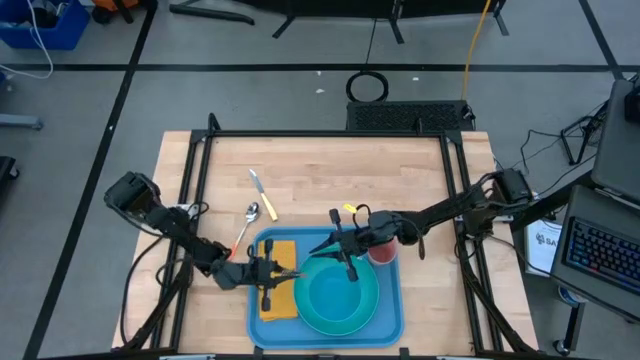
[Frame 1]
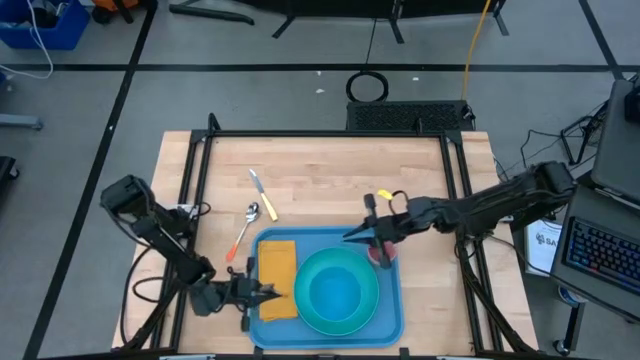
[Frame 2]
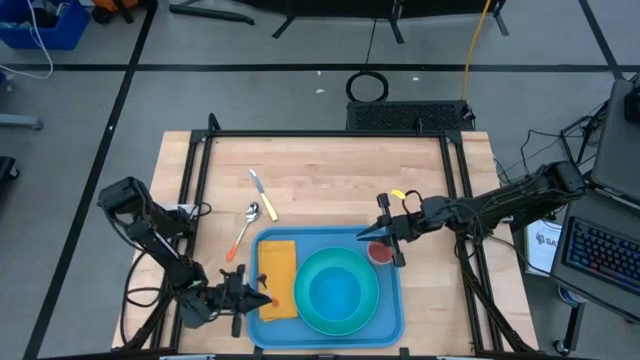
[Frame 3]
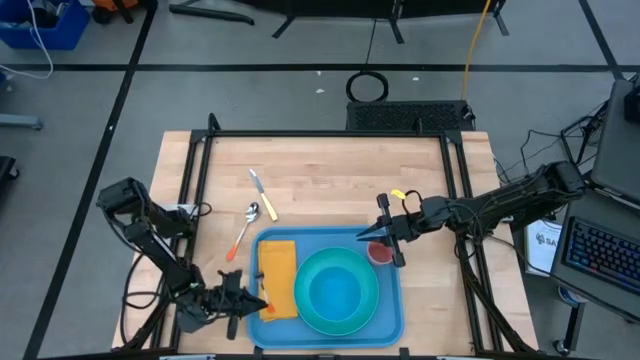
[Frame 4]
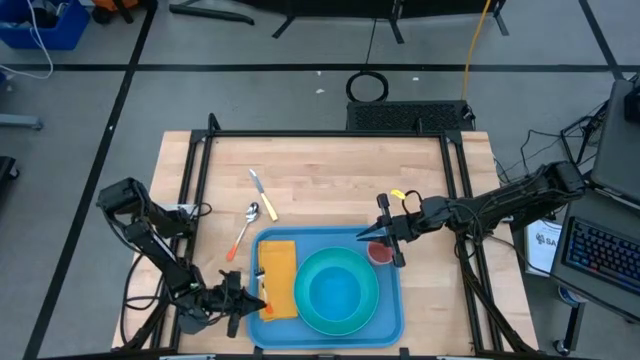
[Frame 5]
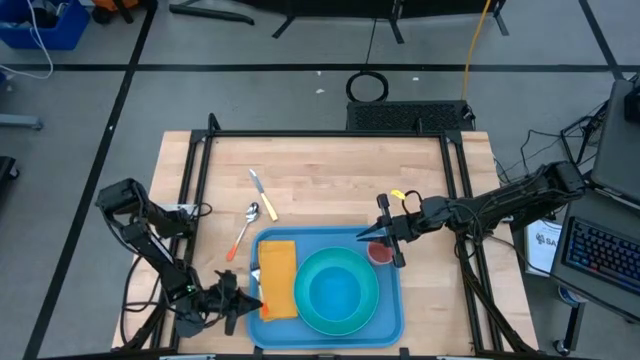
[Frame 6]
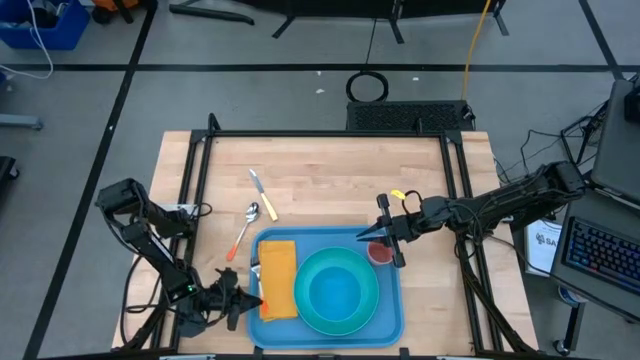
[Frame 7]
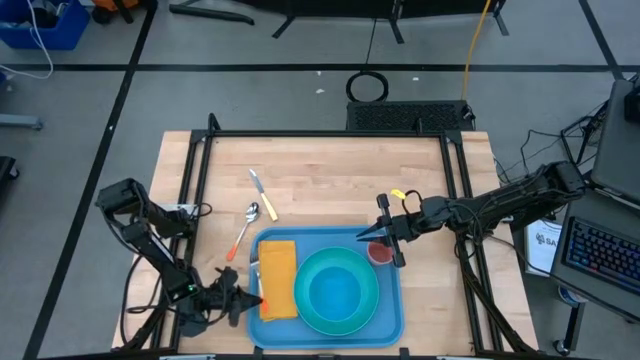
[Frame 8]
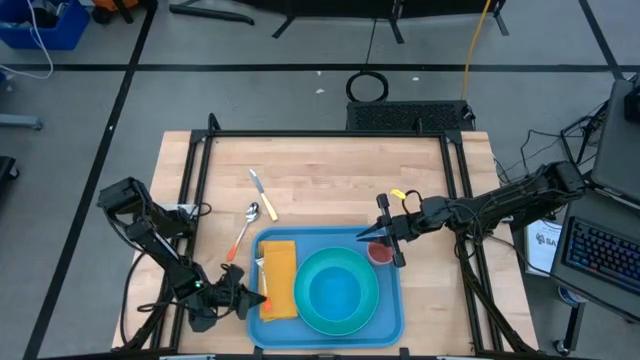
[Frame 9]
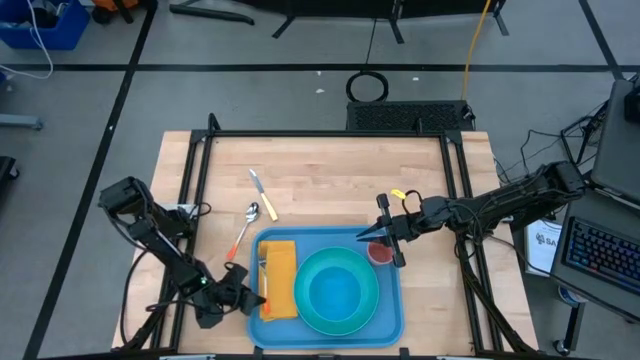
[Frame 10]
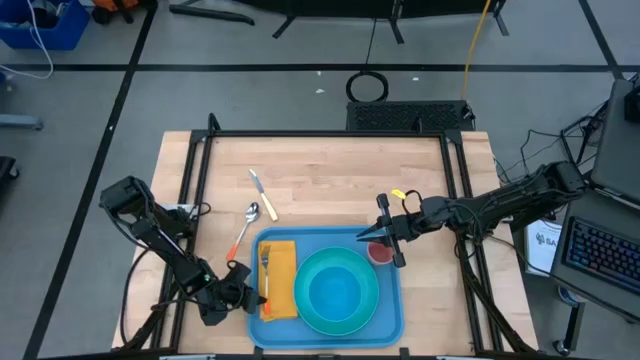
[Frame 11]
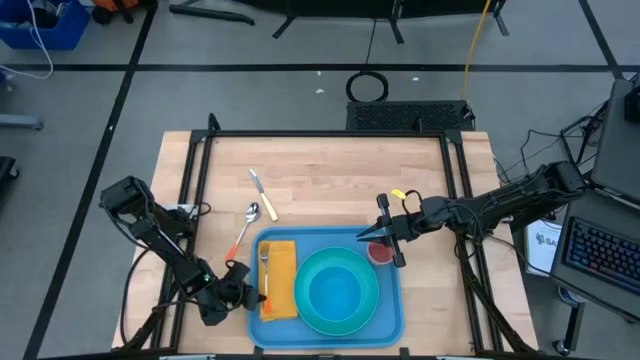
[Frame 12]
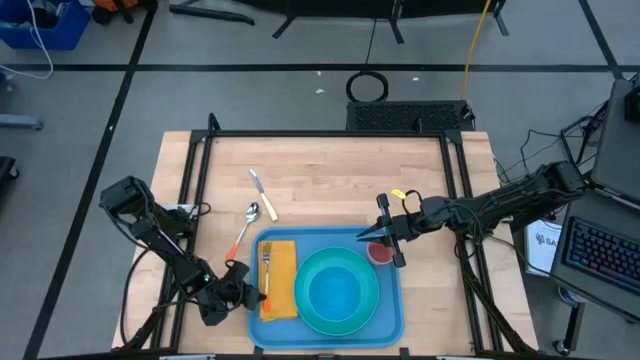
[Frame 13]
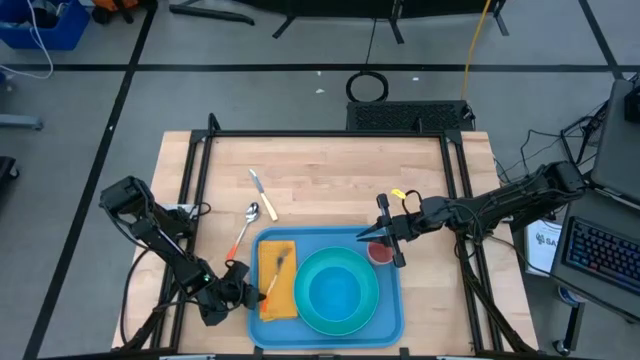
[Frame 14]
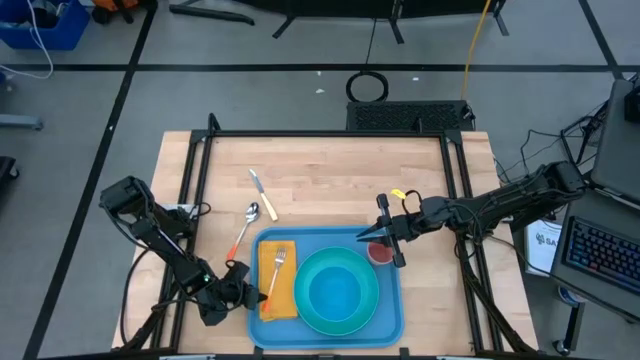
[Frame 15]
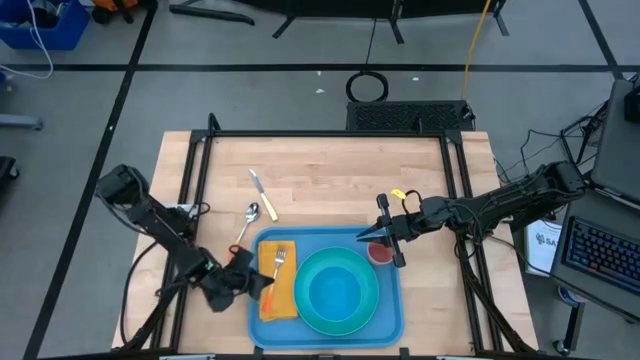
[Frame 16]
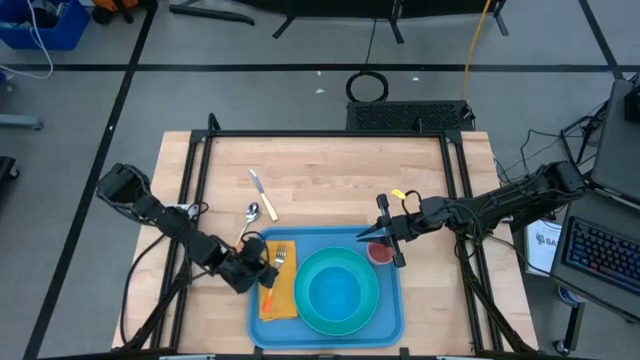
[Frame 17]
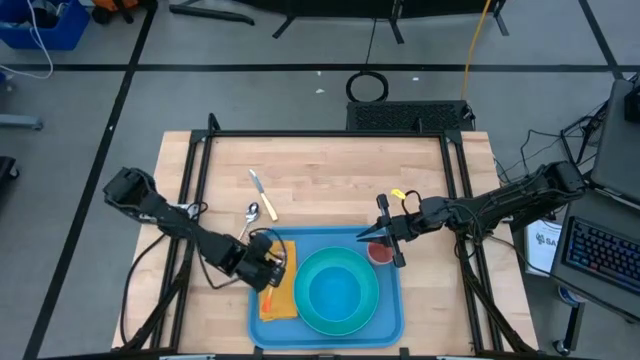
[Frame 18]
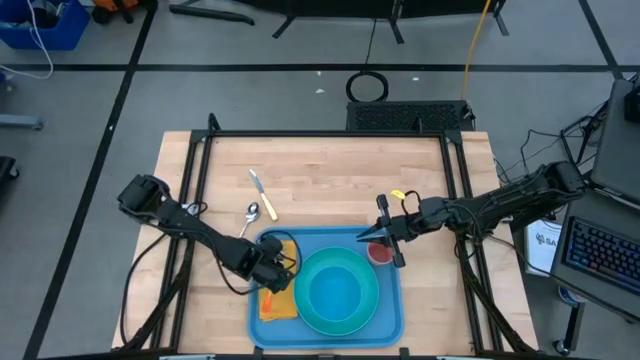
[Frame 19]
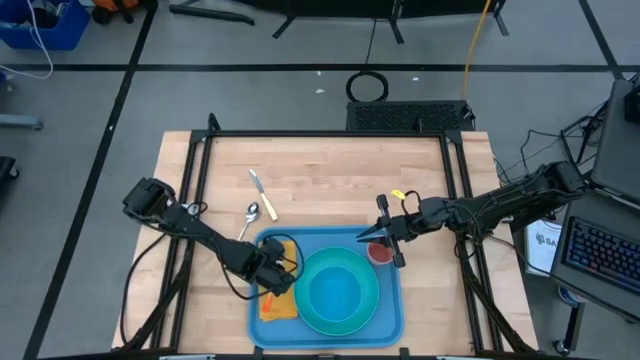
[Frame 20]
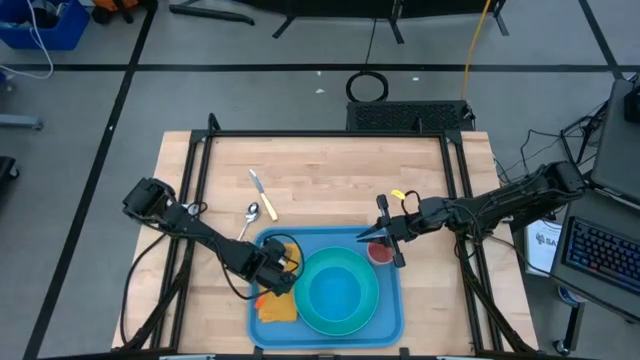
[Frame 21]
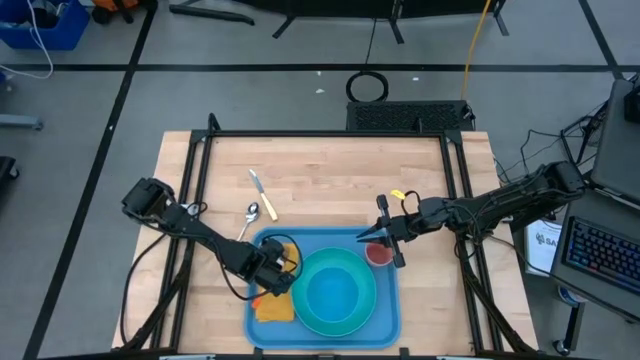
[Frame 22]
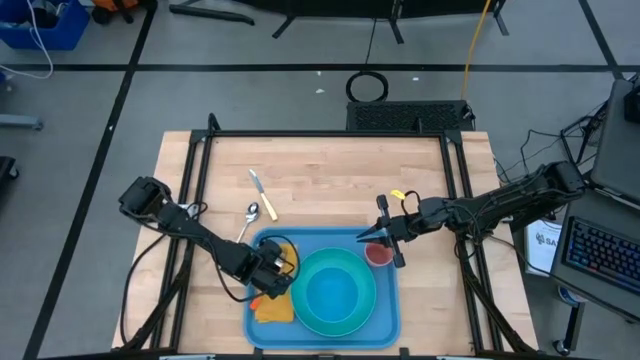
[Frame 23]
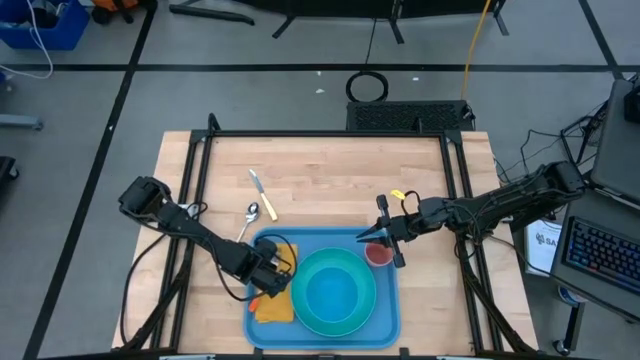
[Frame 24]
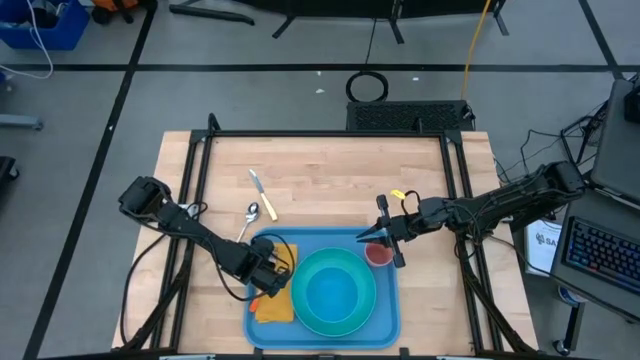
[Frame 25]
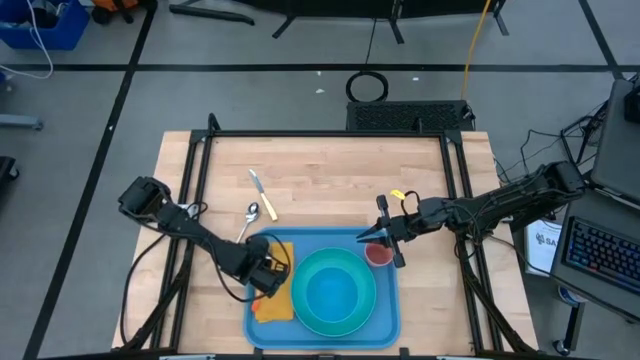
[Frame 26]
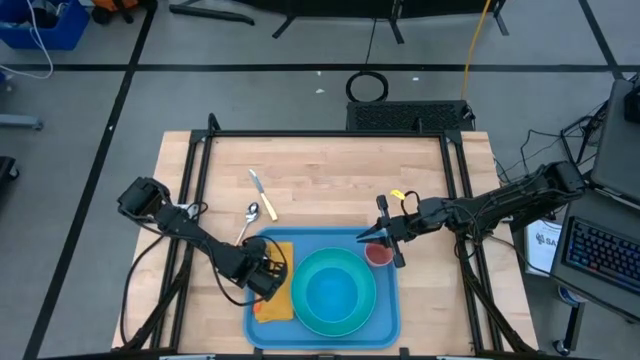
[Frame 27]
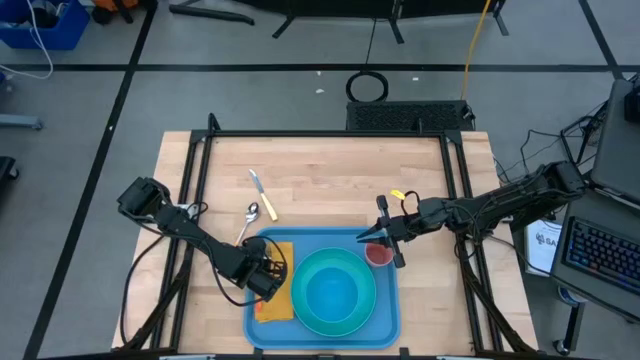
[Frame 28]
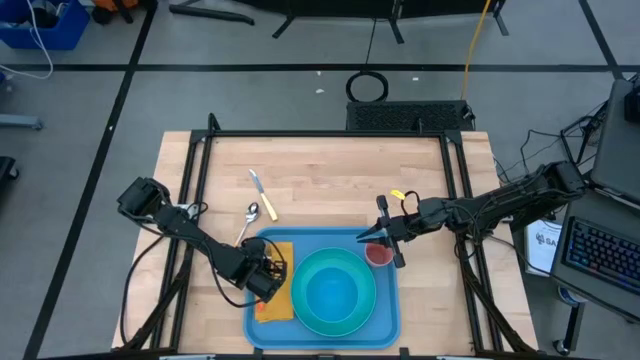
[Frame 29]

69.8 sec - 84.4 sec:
Task: Set up tray
Put the orange fork on the yellow napkin

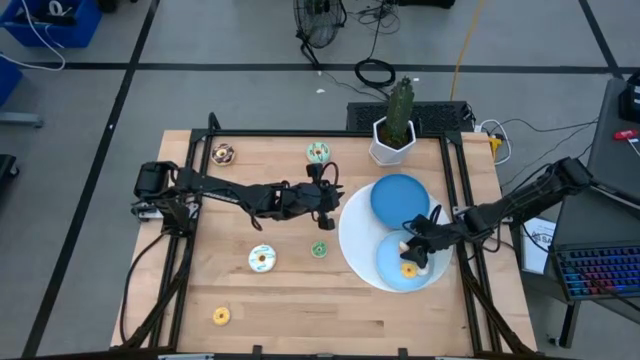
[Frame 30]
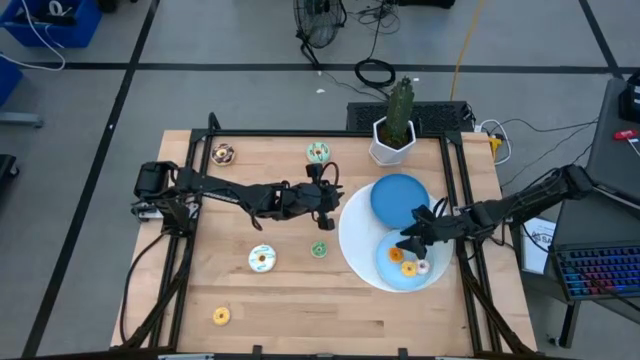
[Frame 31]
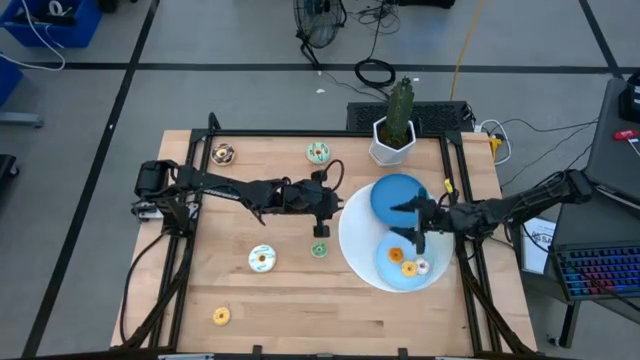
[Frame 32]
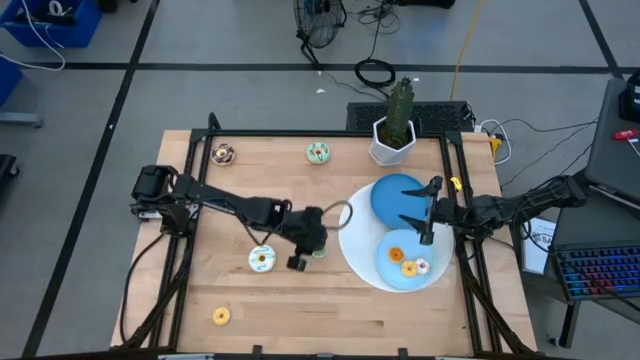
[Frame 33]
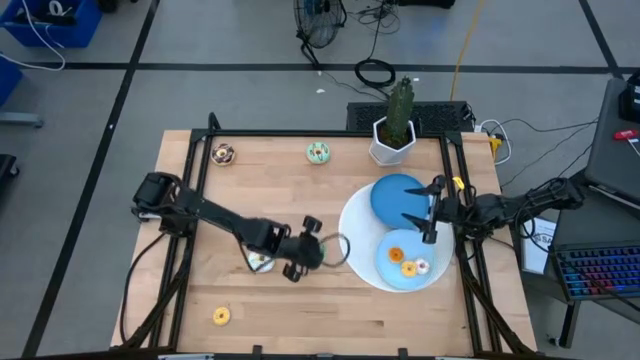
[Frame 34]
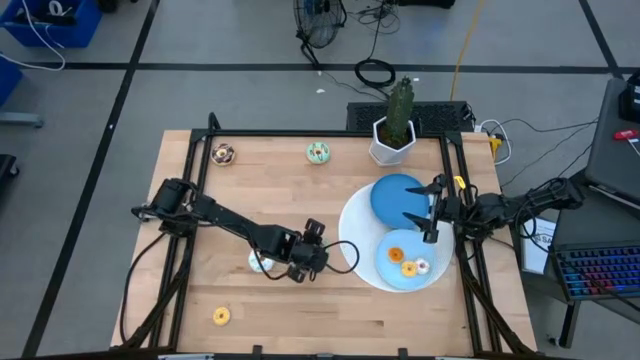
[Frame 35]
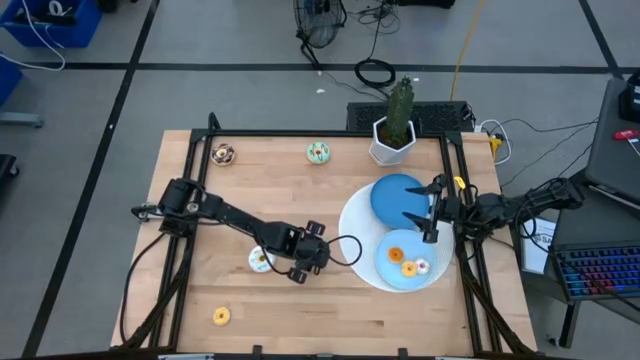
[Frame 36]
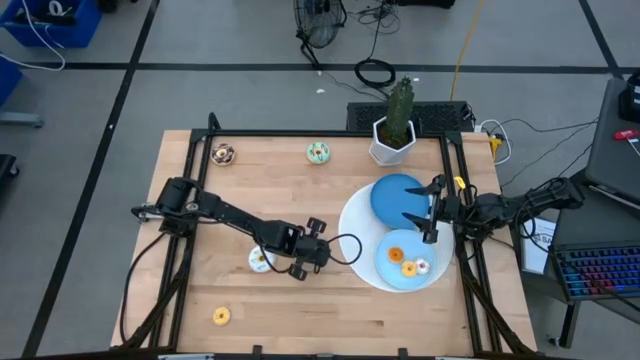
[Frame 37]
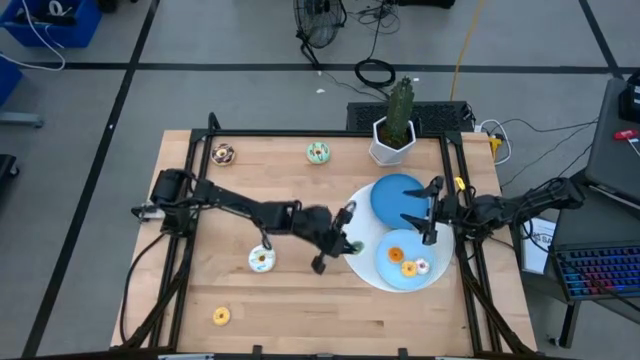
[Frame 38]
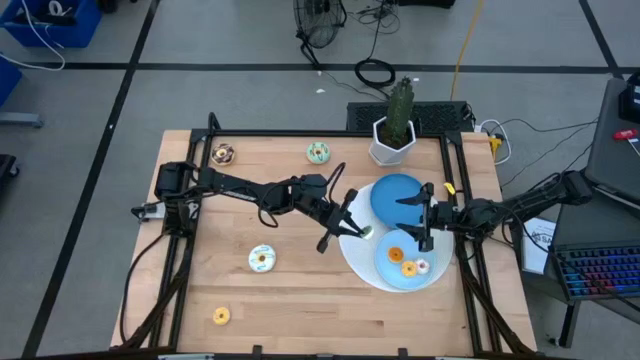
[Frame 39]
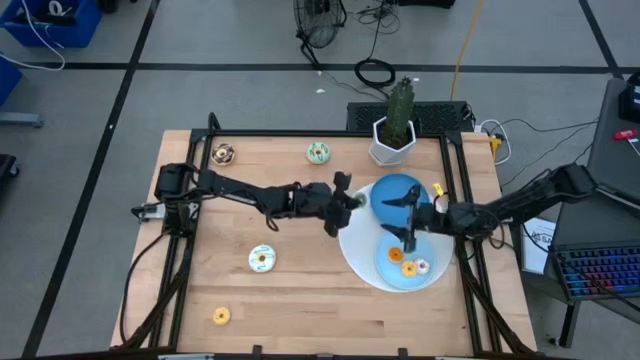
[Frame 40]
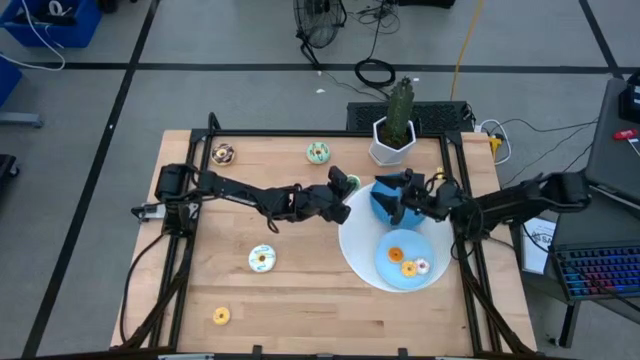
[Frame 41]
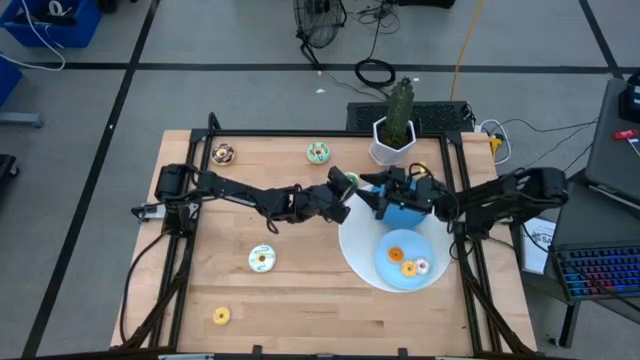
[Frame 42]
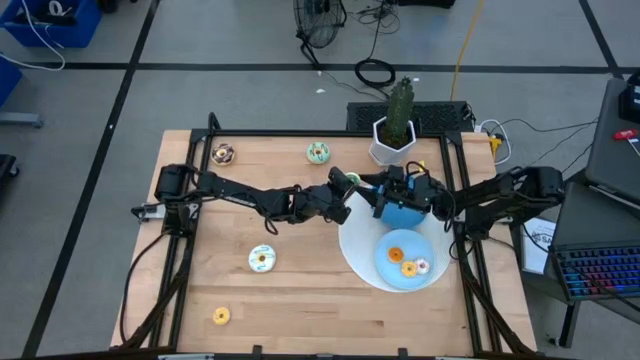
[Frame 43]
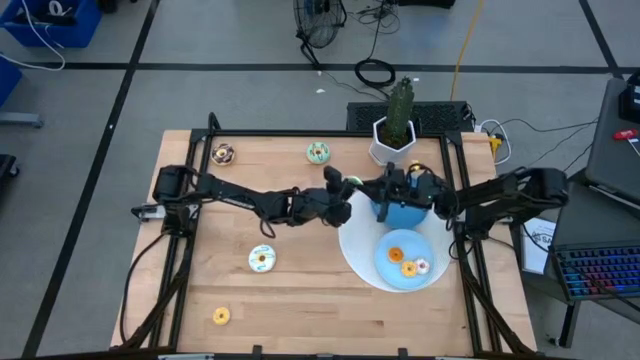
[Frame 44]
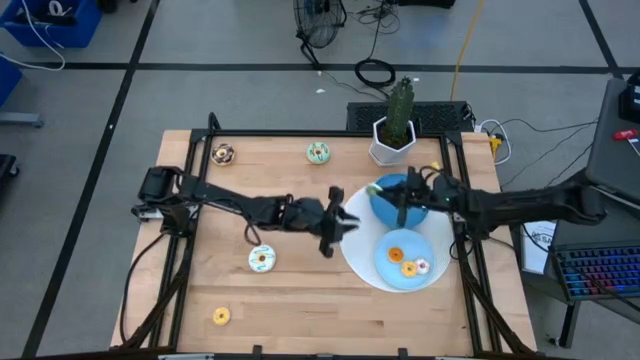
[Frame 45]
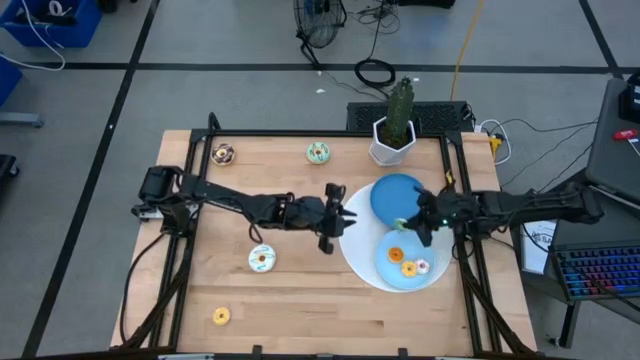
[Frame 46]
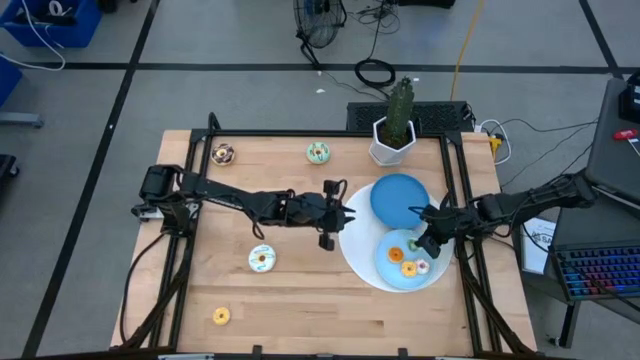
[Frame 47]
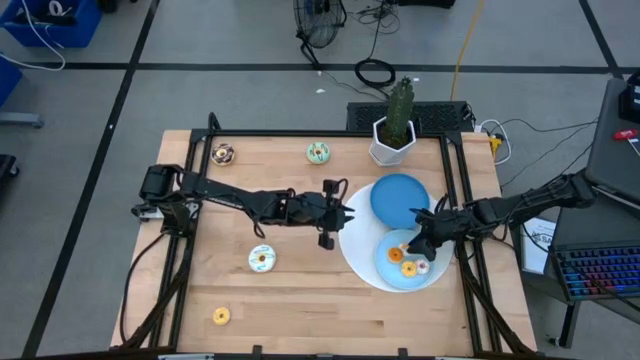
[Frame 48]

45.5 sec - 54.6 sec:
Task: Pick & Place donuts
Put the small green donut on the light blue plate
